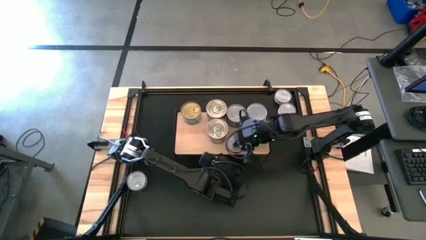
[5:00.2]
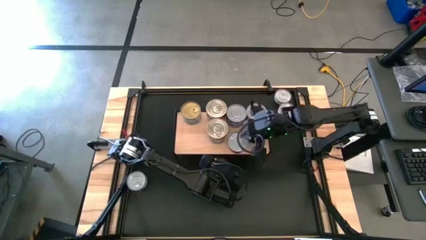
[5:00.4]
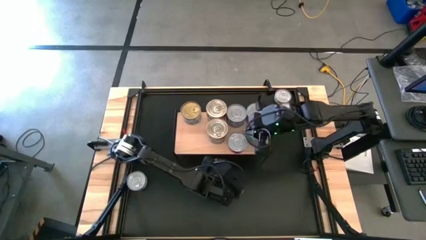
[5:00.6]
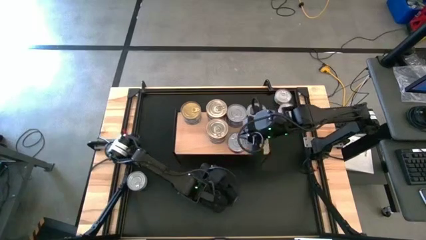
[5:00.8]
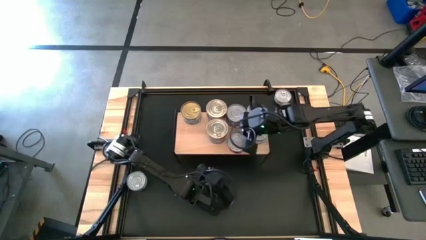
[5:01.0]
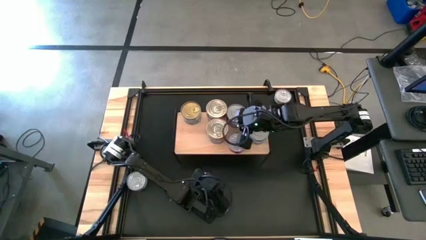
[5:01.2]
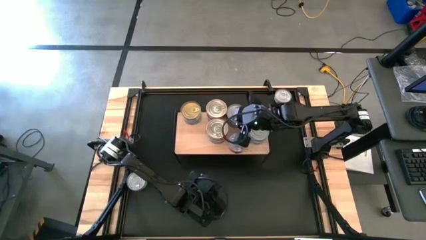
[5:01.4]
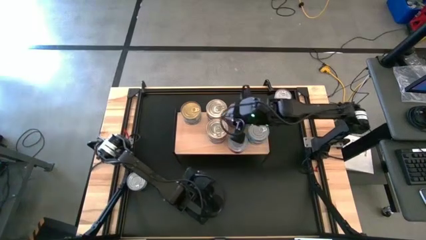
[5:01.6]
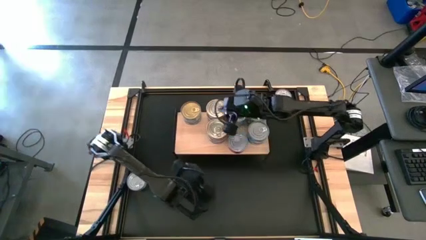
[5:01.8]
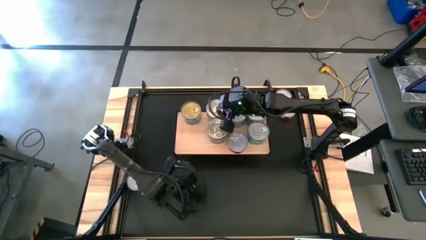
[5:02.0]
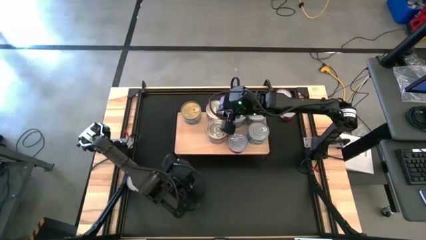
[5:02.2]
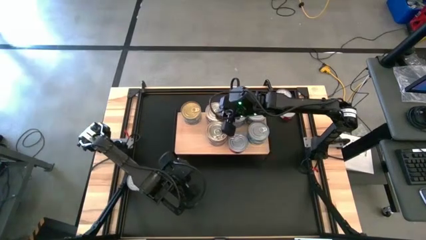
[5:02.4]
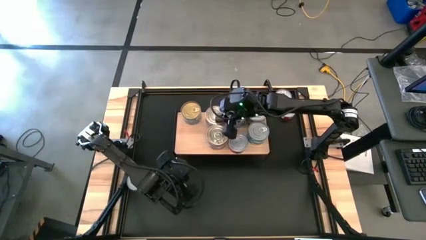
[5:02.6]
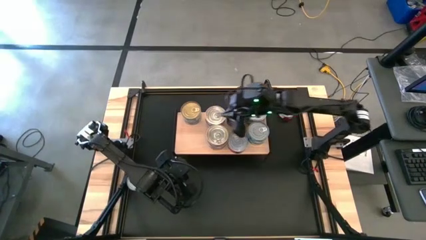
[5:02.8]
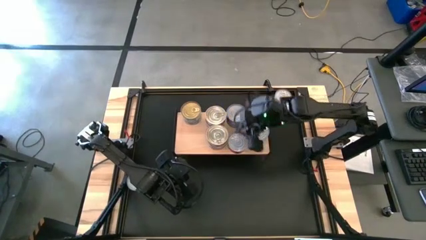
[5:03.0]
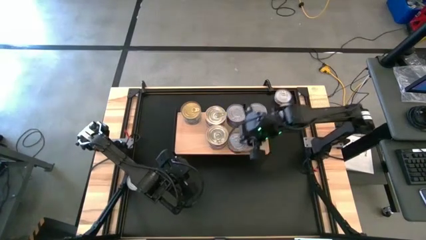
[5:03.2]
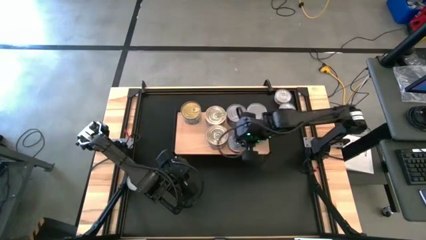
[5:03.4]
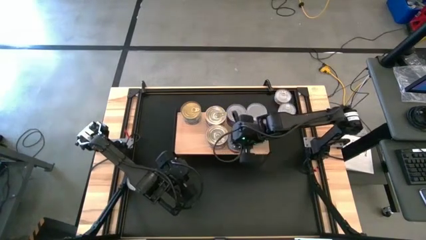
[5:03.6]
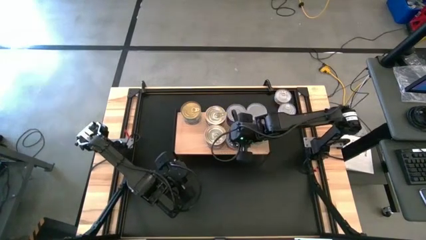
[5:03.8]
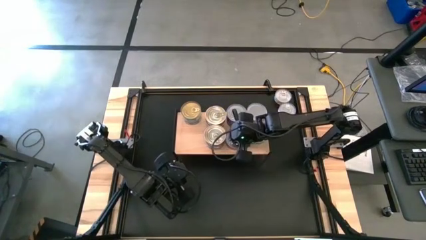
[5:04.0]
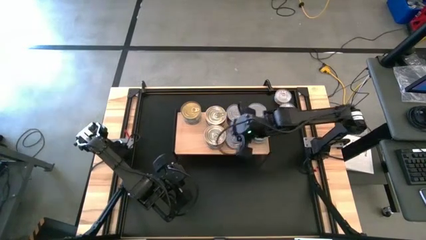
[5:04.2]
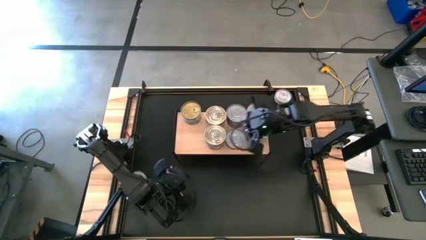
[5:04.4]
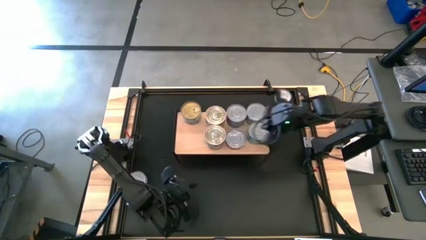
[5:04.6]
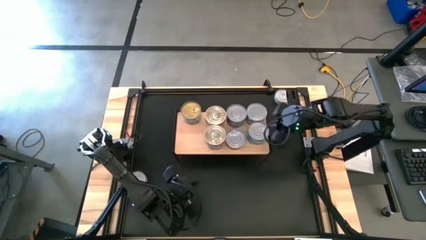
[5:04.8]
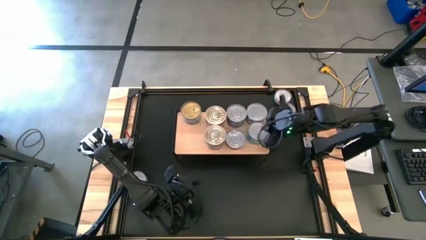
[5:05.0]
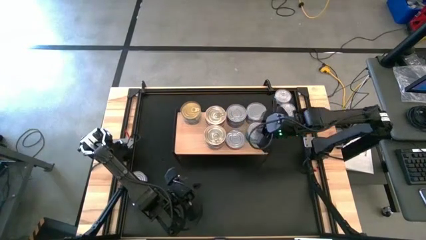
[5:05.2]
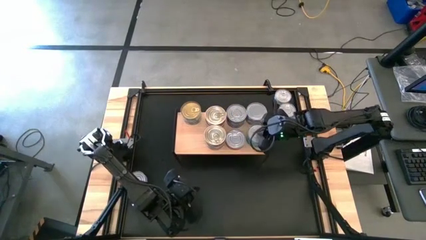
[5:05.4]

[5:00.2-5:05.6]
Task: Stack canned seafood by type on shelf
Adjust the tuna cans on the shelf

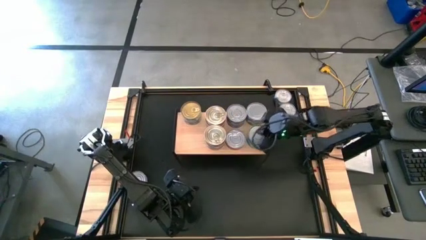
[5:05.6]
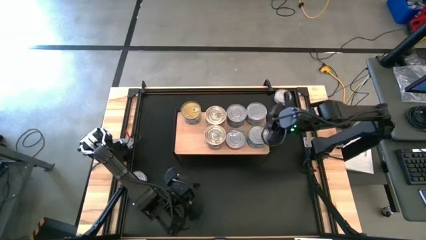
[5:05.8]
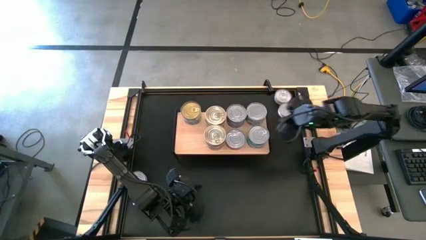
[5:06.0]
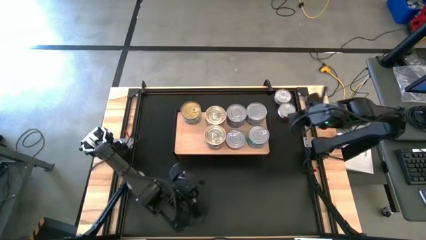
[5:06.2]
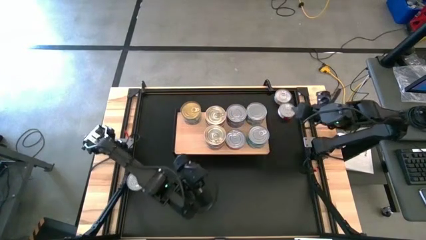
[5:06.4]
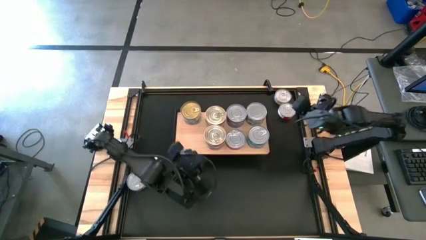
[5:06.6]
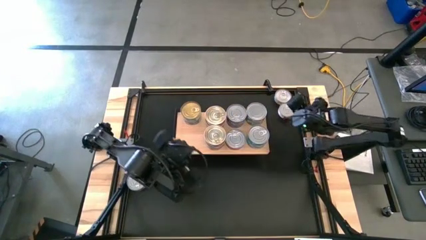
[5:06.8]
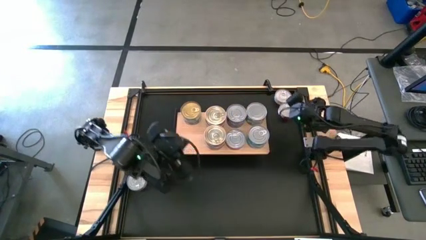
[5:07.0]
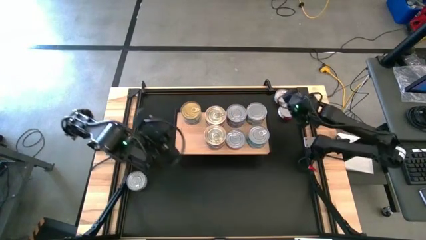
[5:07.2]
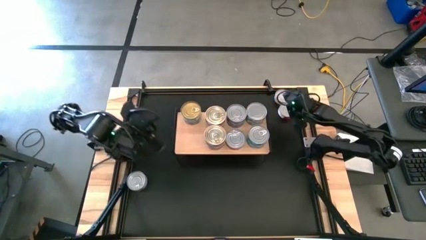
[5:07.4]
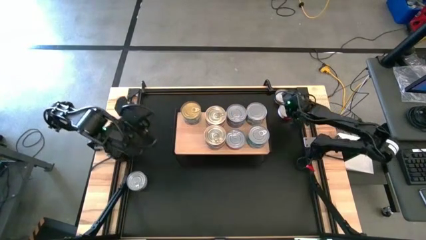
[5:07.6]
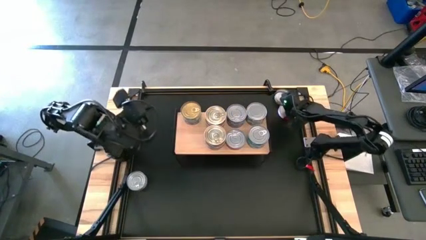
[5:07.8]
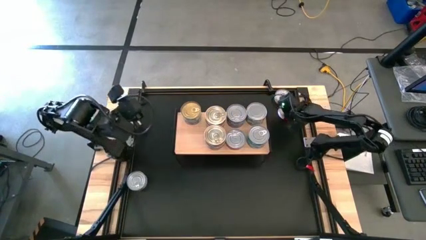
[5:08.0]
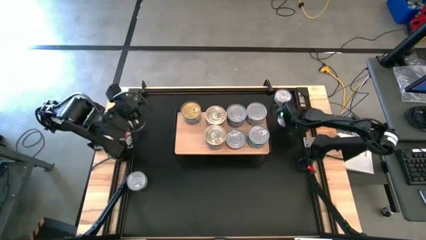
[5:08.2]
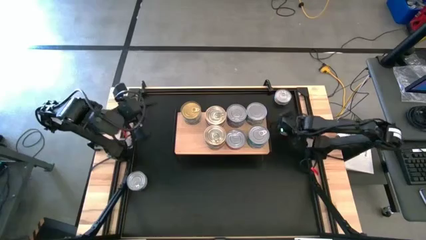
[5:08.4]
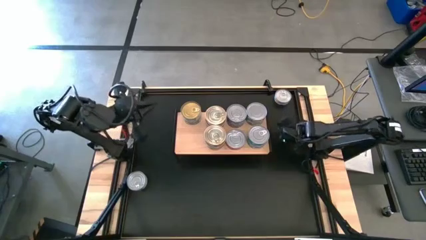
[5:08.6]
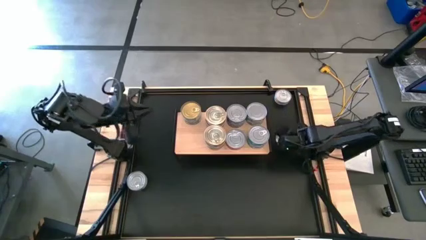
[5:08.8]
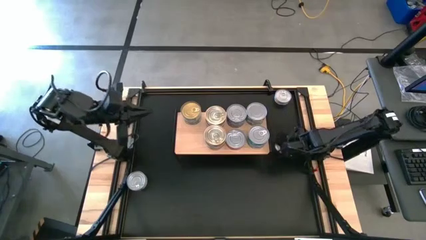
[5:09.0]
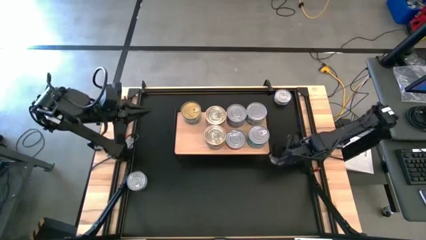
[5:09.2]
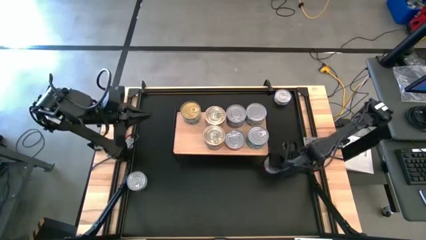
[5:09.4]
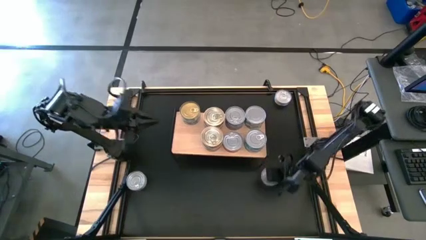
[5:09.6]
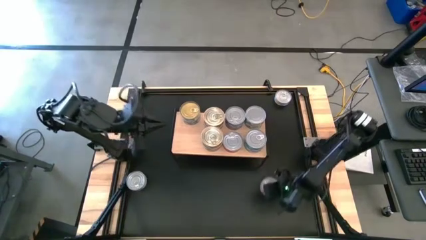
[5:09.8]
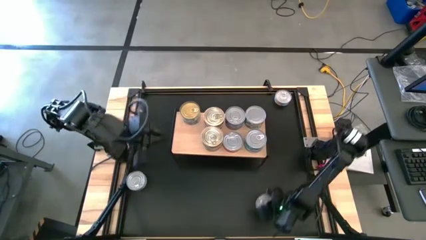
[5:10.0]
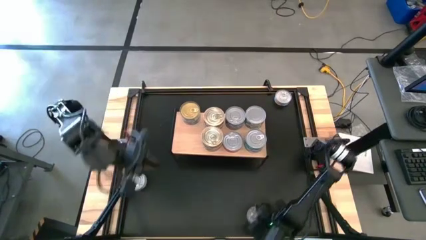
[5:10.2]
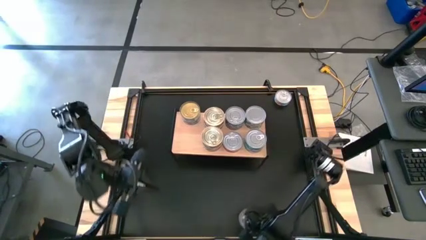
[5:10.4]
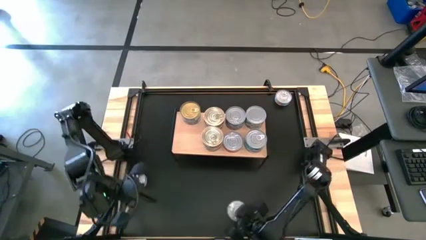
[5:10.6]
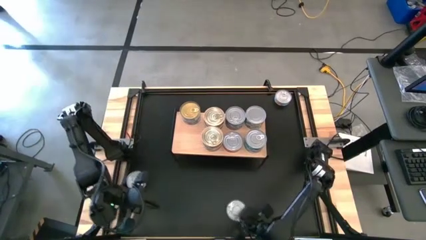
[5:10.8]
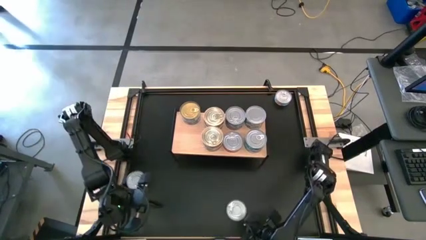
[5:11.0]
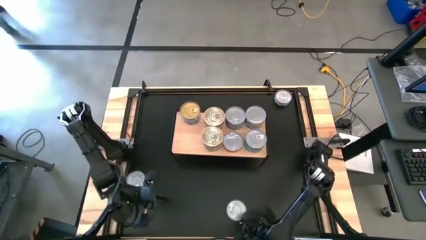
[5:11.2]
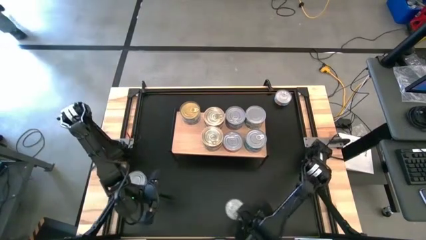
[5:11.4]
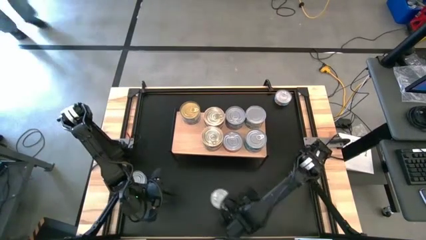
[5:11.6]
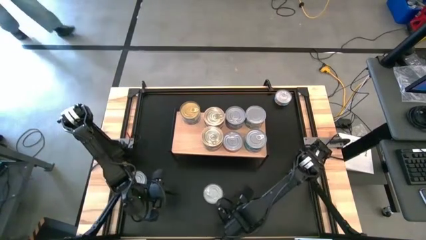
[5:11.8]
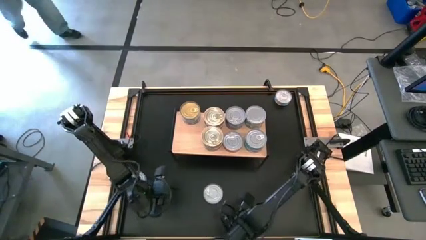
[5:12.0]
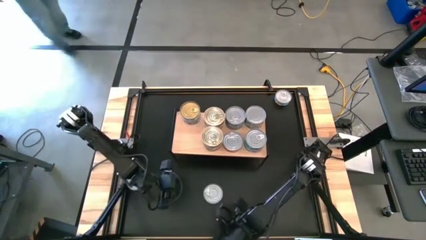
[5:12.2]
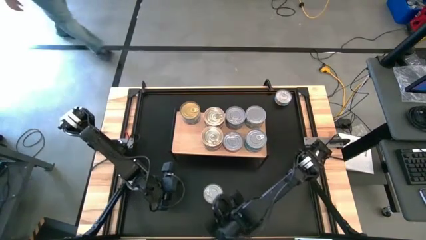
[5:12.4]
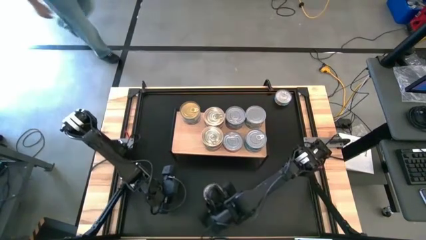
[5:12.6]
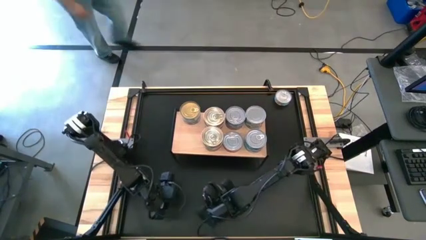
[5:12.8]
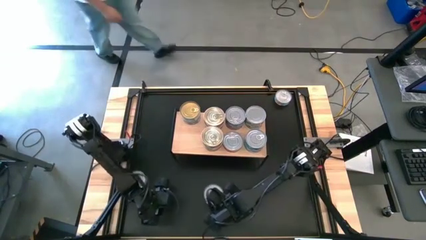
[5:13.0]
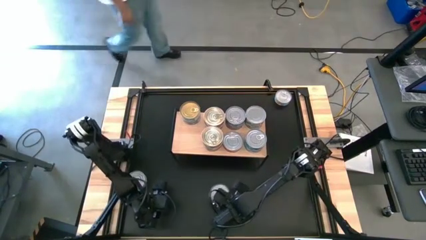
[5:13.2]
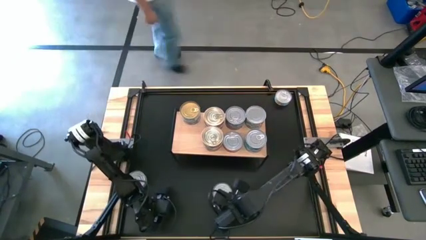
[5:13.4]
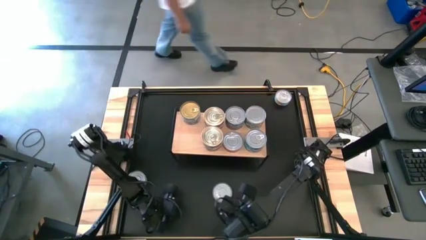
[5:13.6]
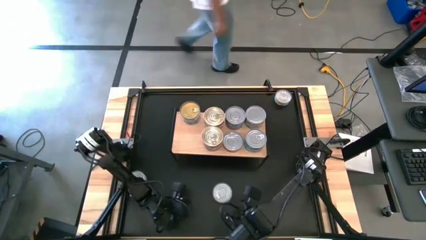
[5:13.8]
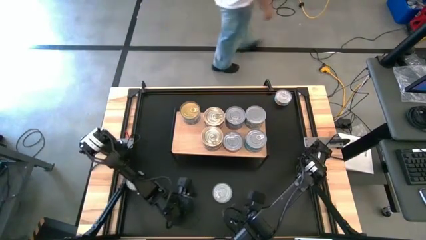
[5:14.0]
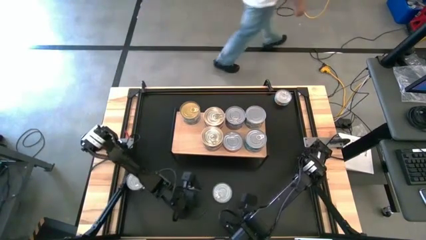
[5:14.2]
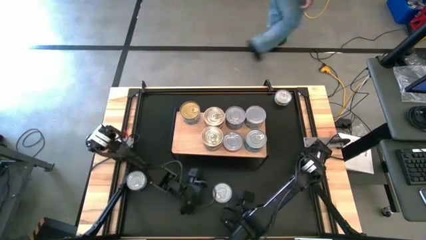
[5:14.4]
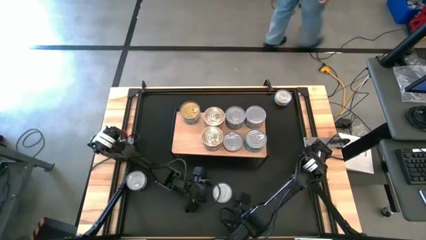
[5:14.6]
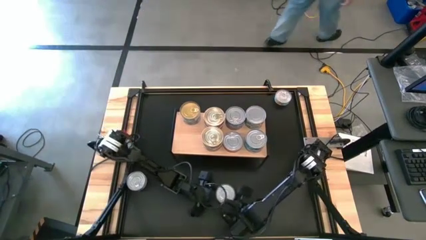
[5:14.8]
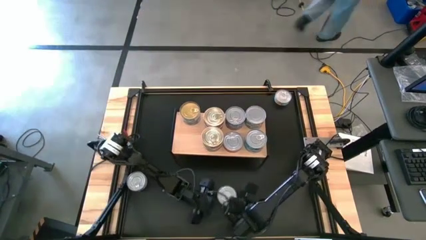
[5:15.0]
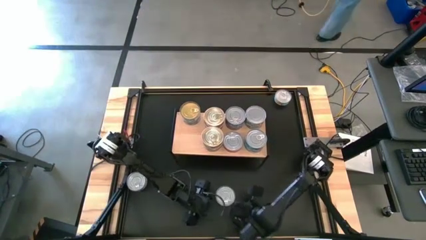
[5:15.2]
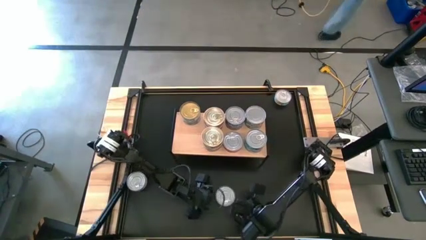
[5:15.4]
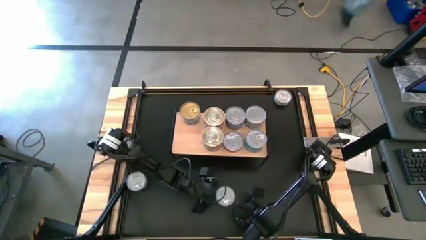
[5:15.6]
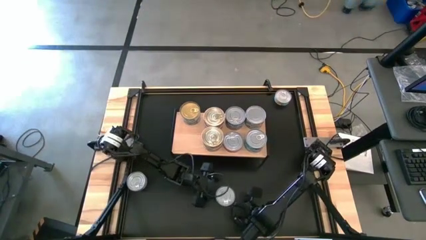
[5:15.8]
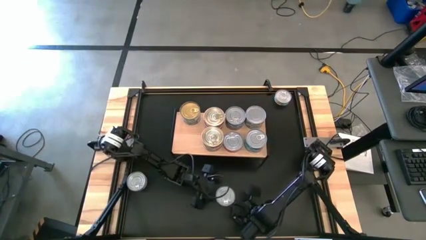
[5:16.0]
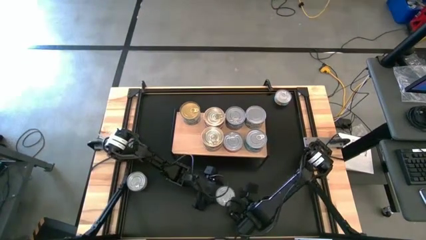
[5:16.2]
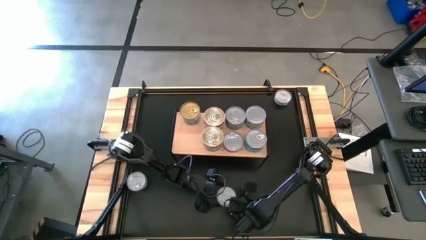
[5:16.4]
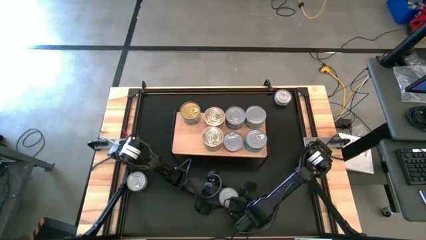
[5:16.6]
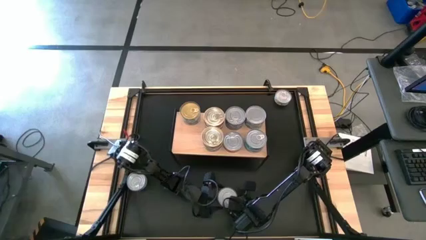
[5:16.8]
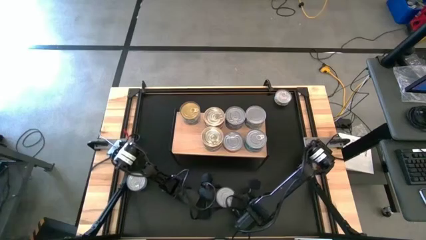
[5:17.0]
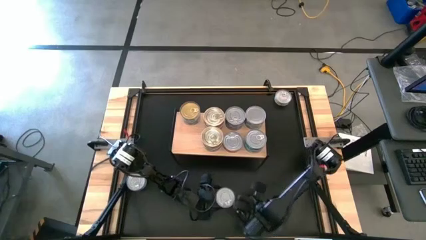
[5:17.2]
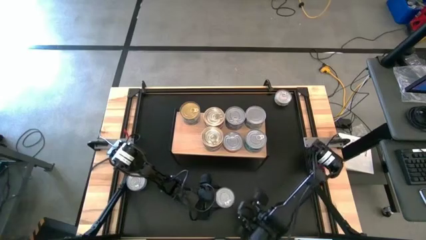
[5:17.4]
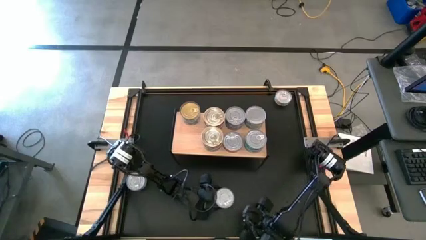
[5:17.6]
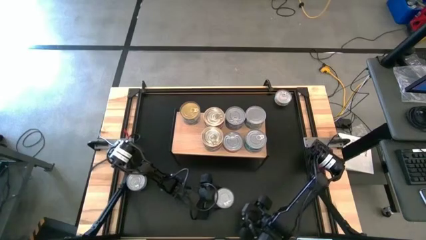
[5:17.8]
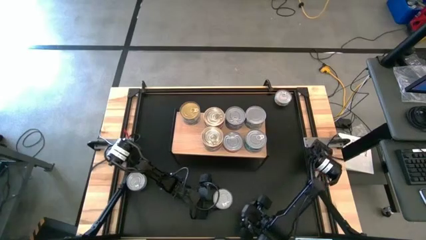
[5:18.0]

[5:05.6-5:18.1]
Stack the red tuna can on top of the red tuna can on the shelf
